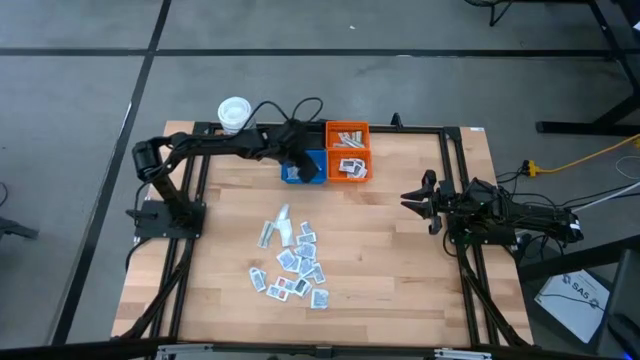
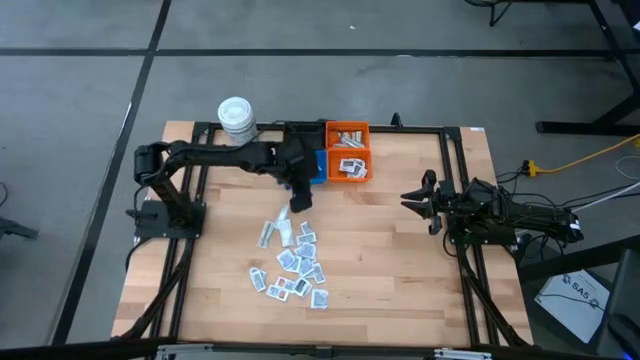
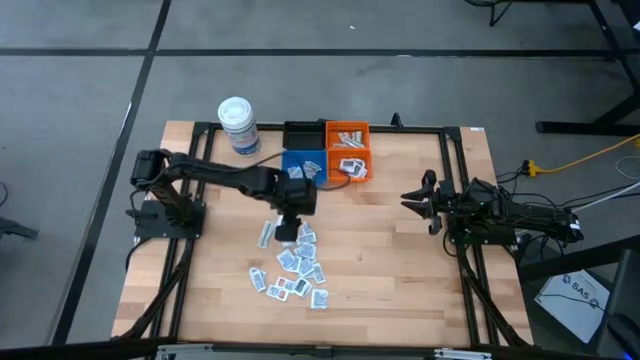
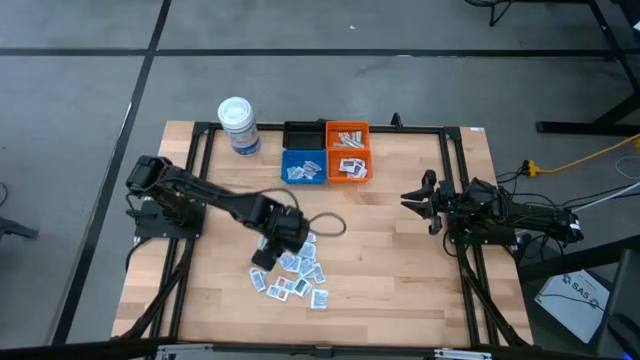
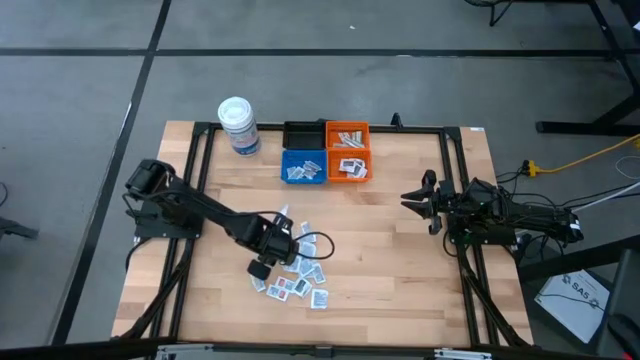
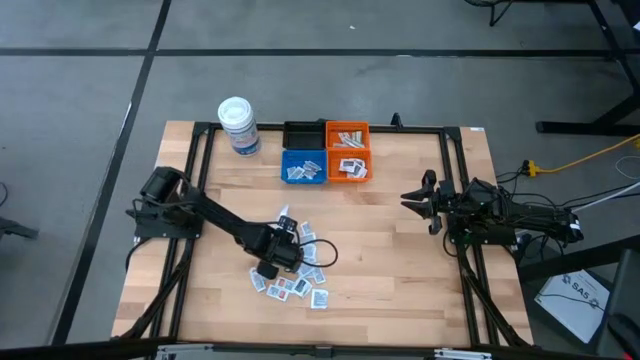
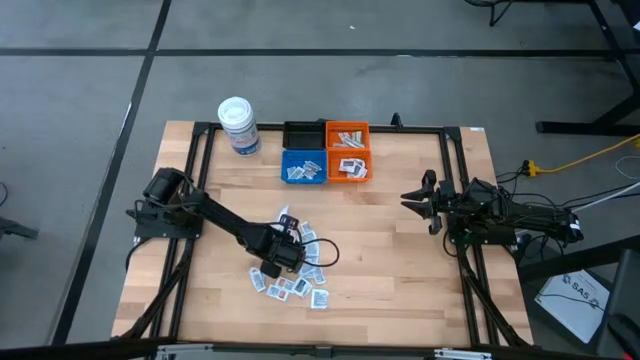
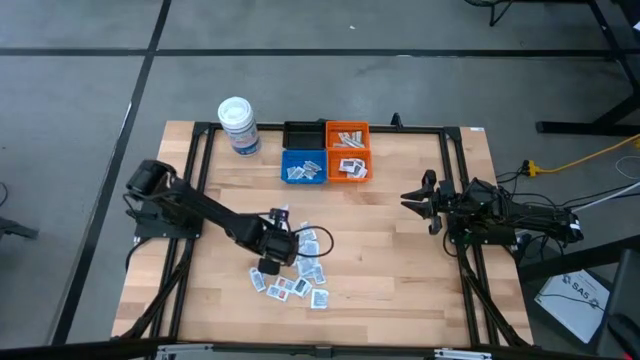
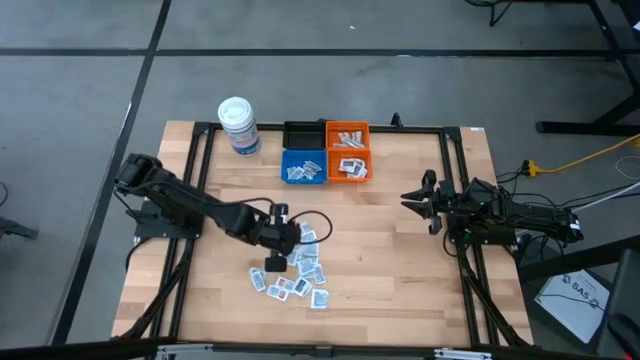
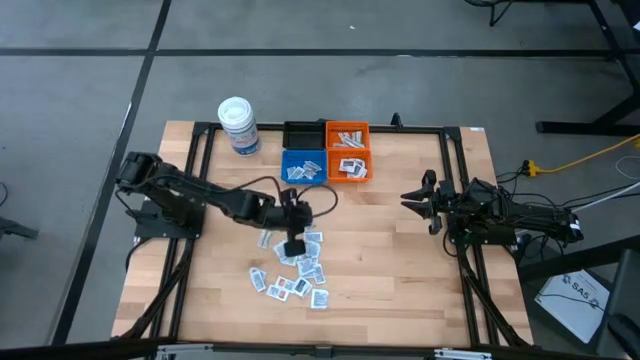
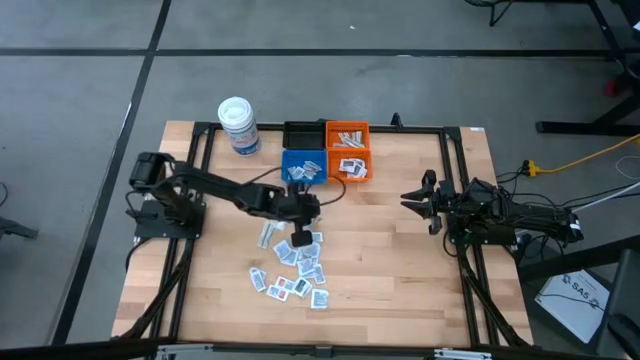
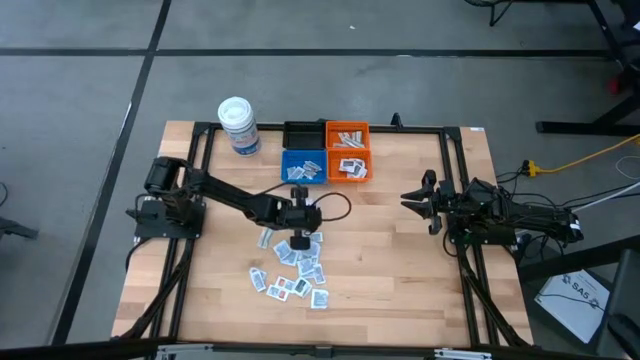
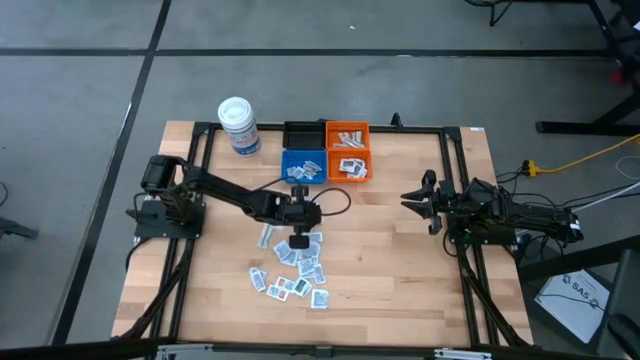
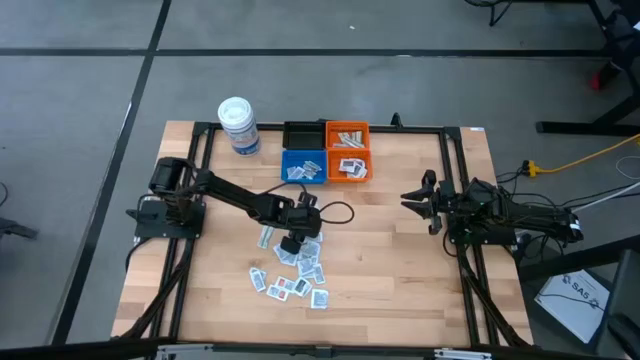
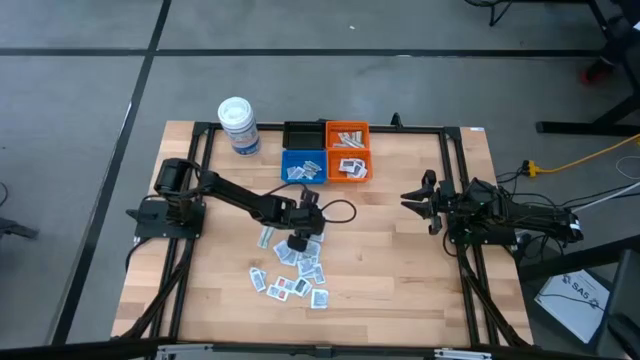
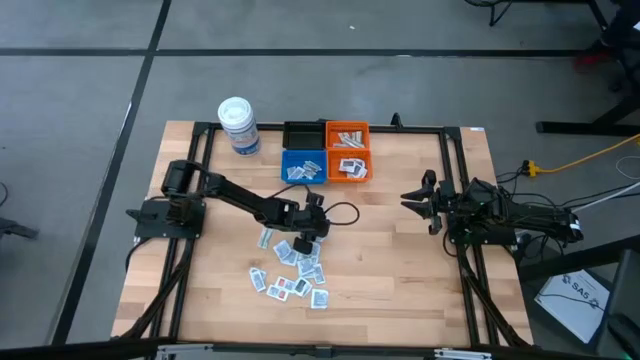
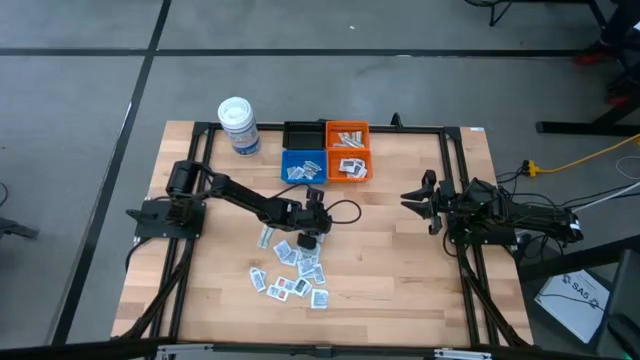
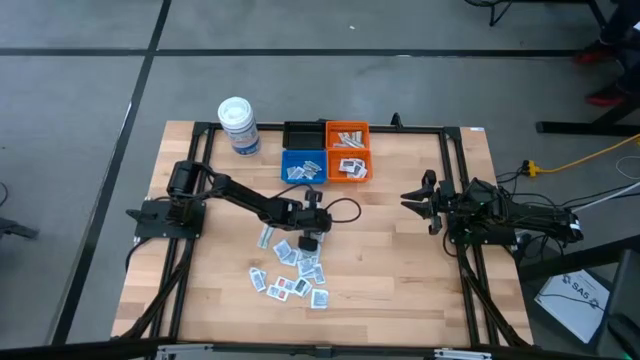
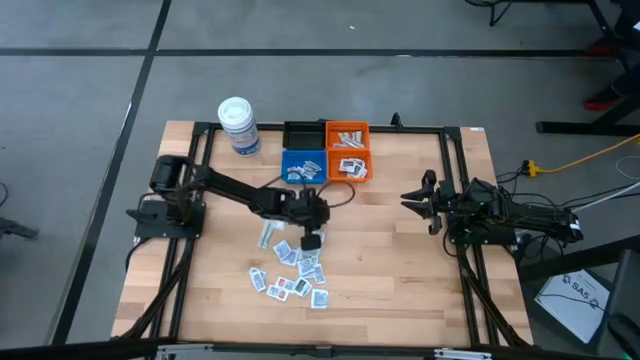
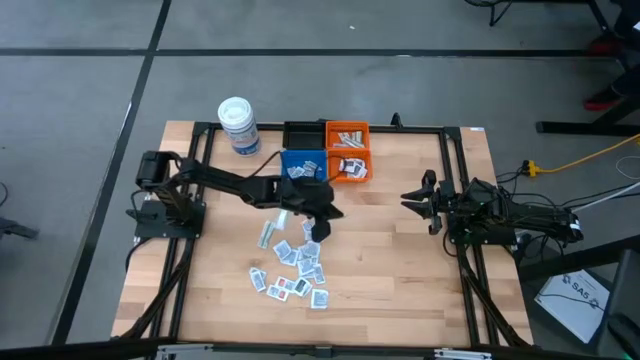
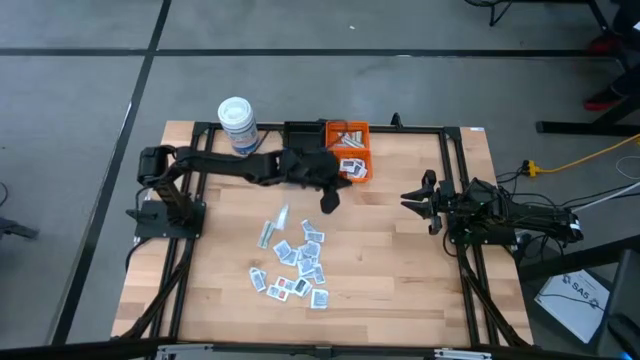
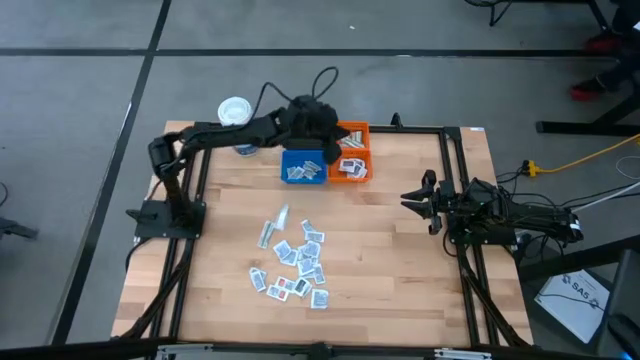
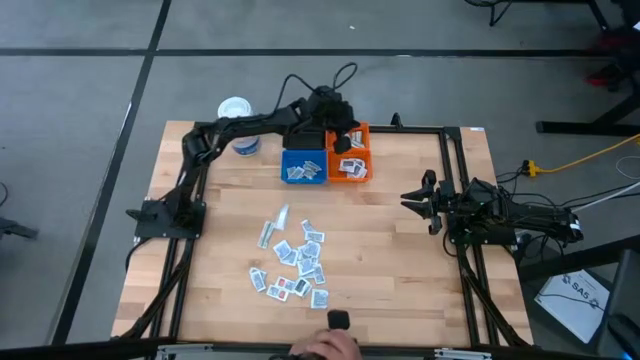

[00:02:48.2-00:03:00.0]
Task: Pick & Place First Aid Supplies
Put the bandage pack into the top orange bin

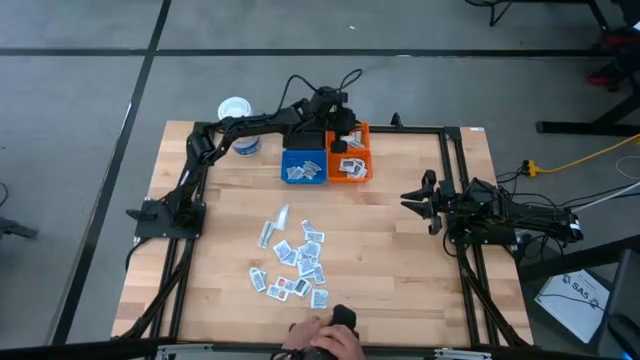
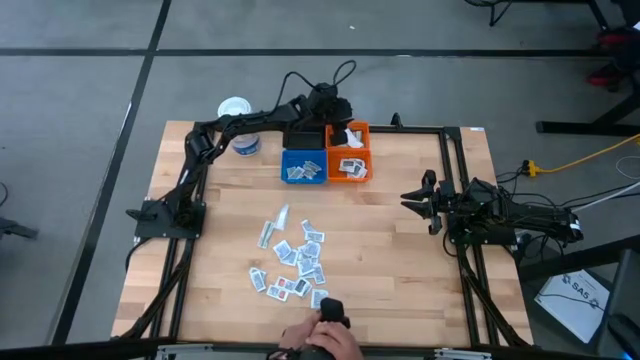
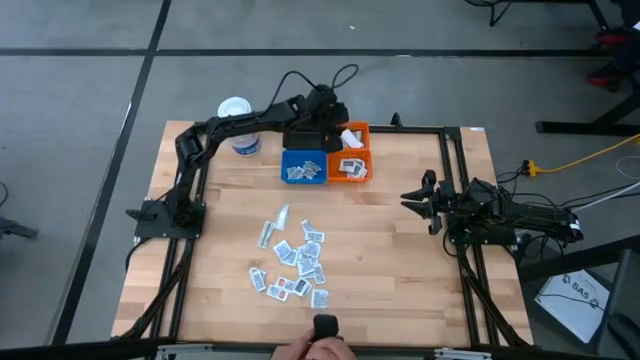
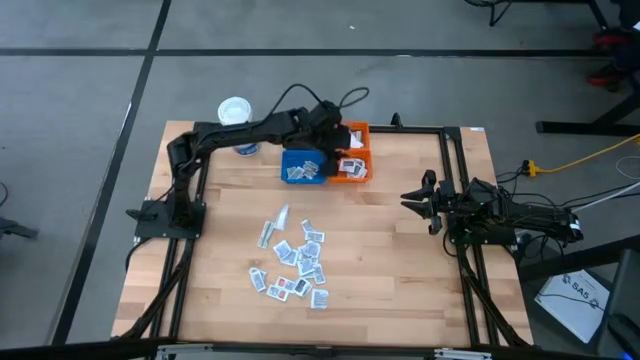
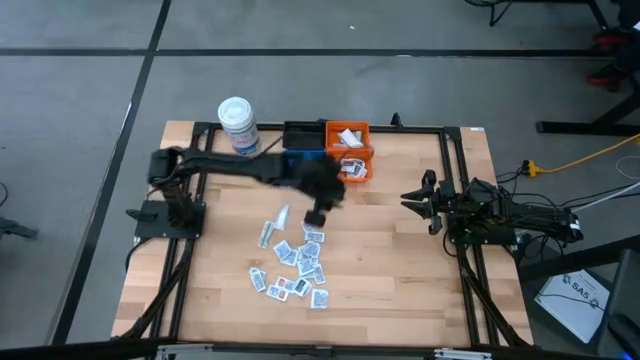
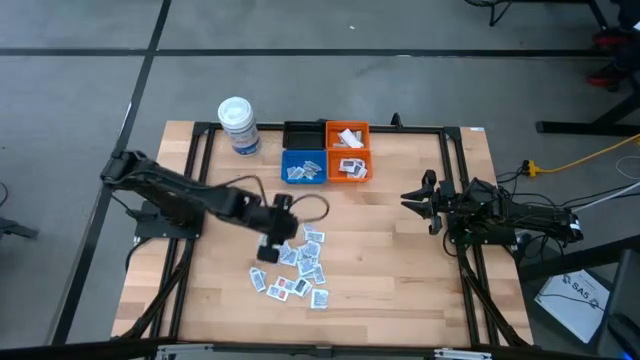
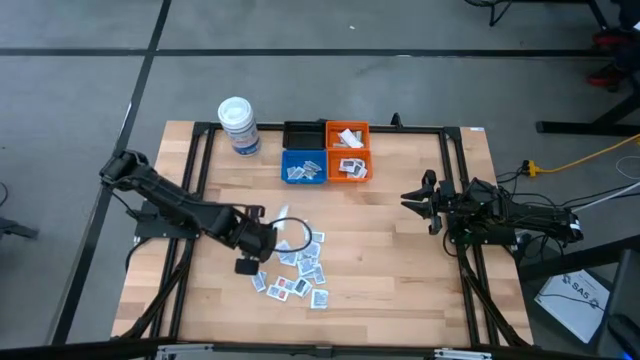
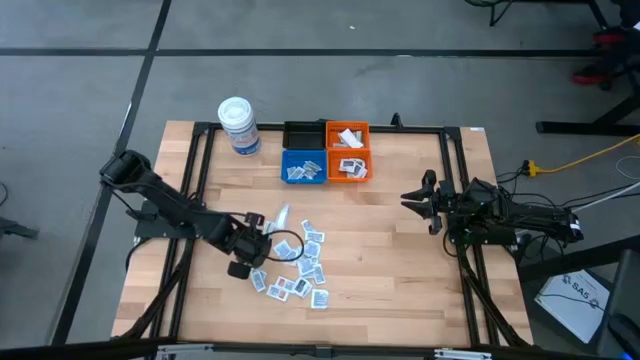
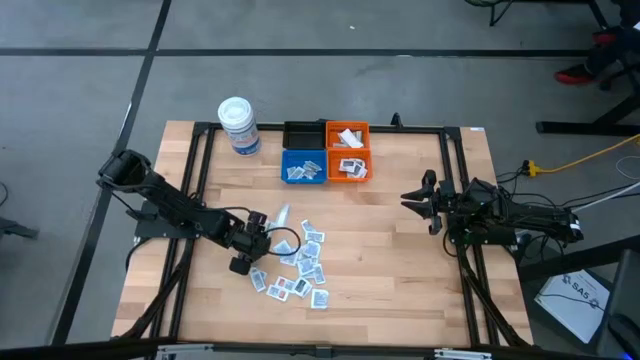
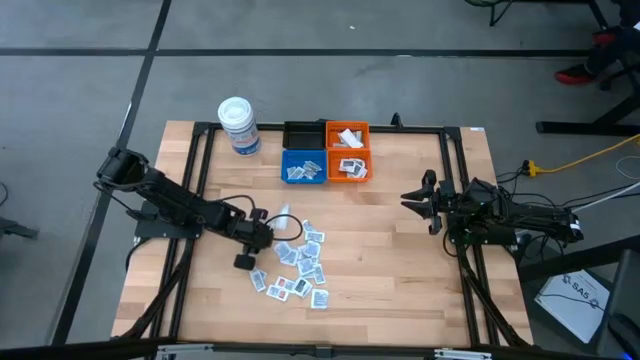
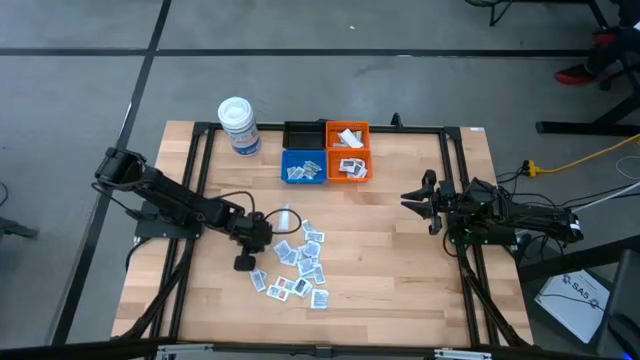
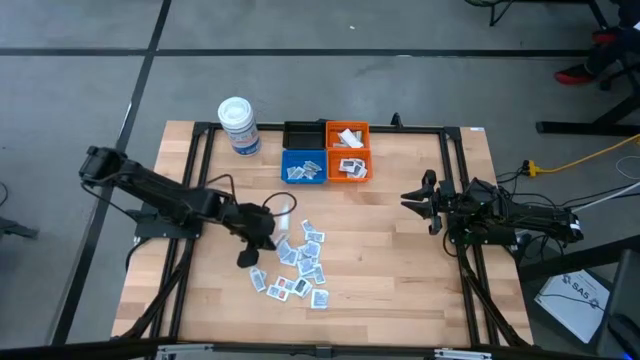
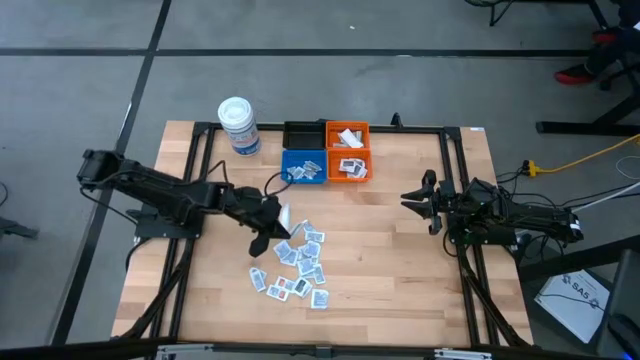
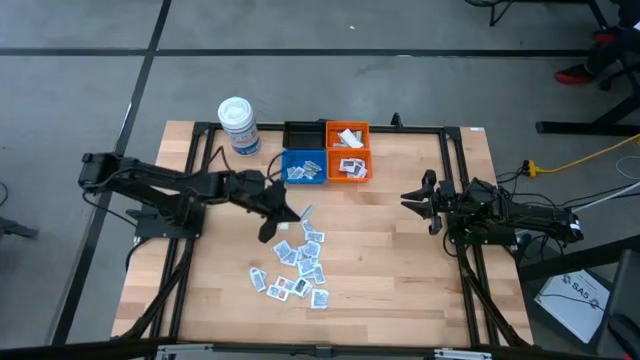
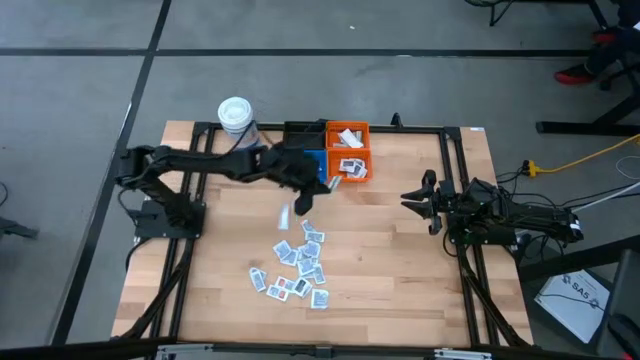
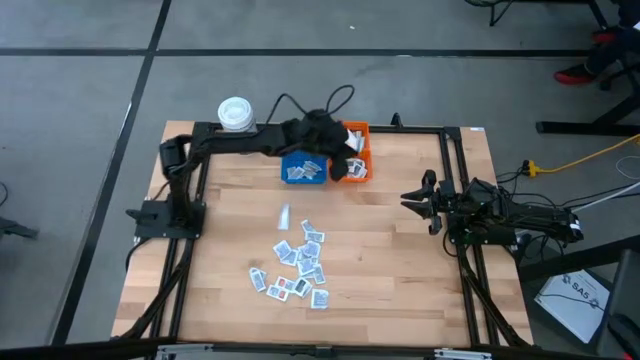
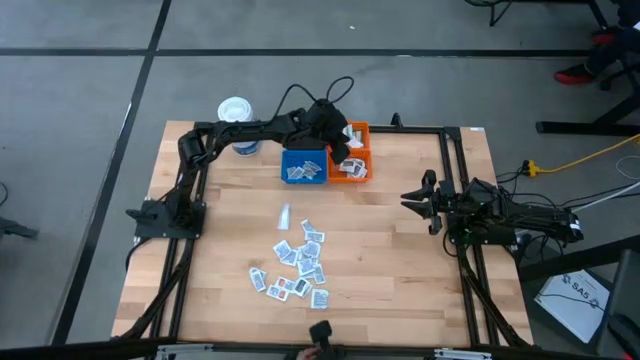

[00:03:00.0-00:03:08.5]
Put the bandage pack into the top orange bin
